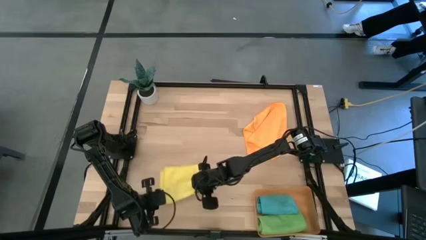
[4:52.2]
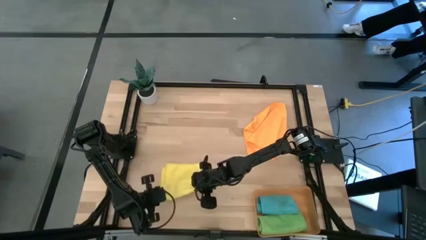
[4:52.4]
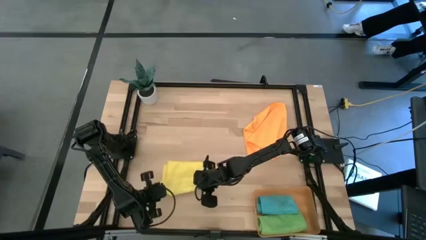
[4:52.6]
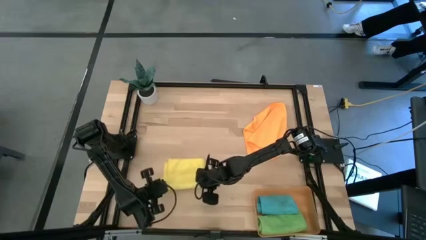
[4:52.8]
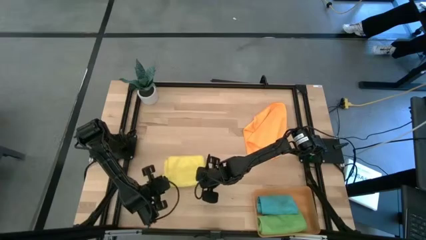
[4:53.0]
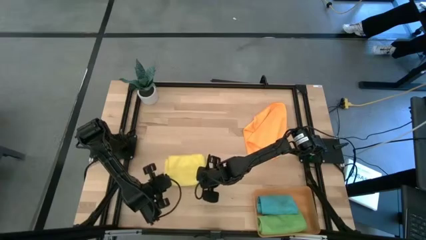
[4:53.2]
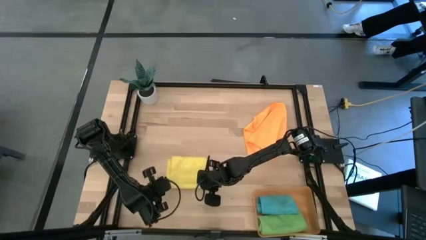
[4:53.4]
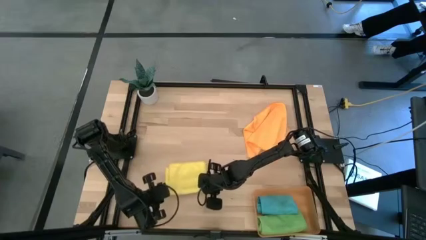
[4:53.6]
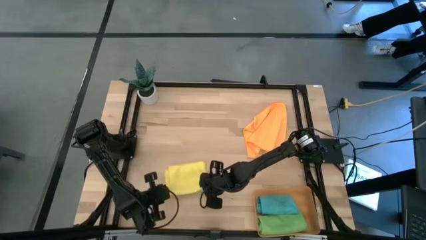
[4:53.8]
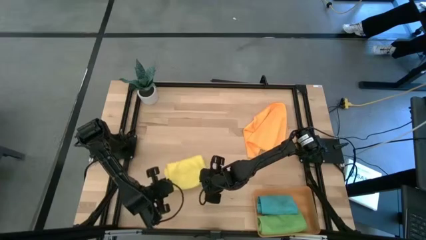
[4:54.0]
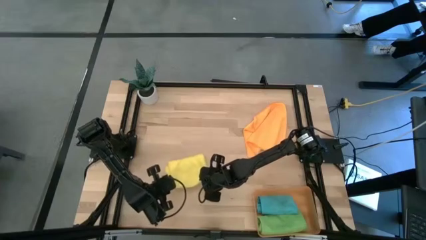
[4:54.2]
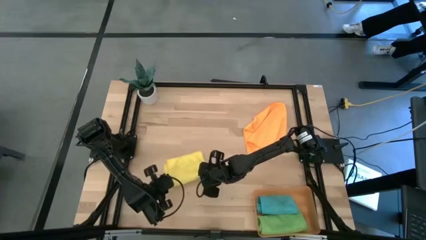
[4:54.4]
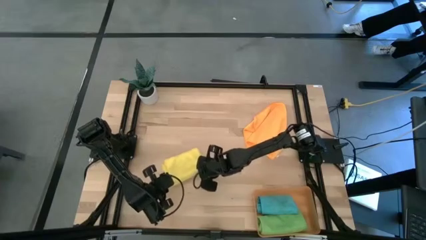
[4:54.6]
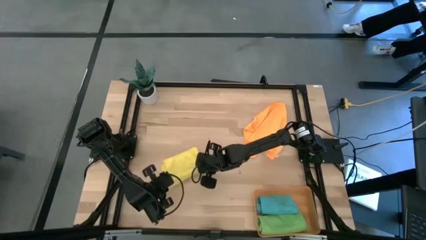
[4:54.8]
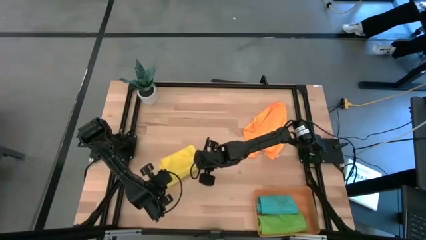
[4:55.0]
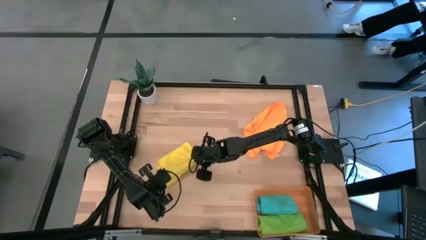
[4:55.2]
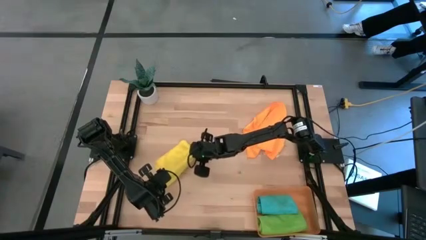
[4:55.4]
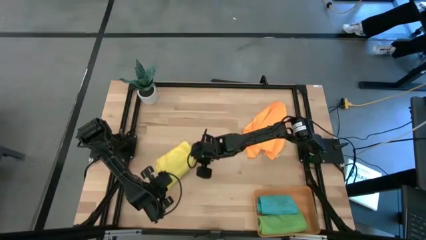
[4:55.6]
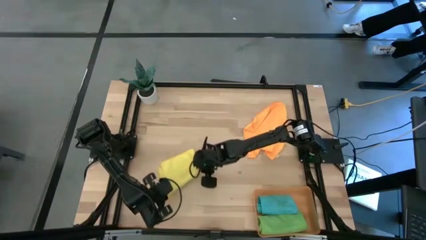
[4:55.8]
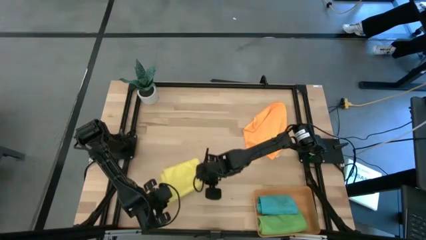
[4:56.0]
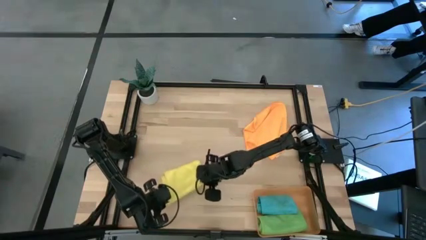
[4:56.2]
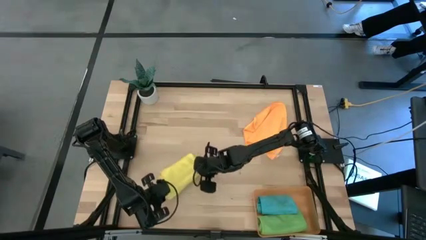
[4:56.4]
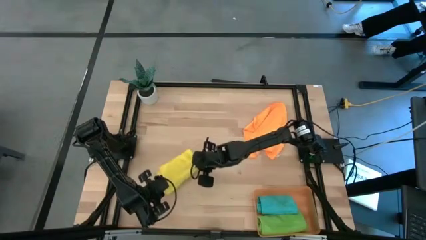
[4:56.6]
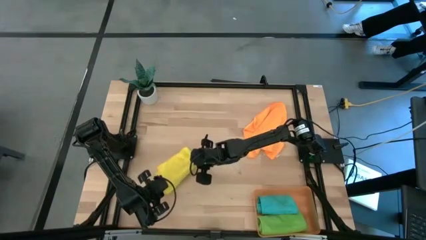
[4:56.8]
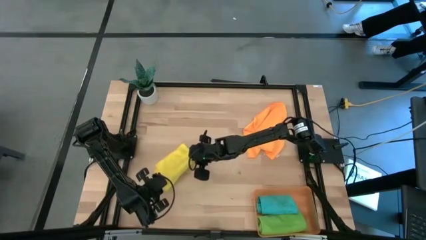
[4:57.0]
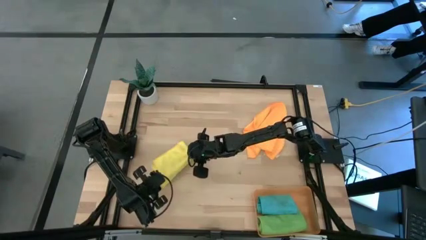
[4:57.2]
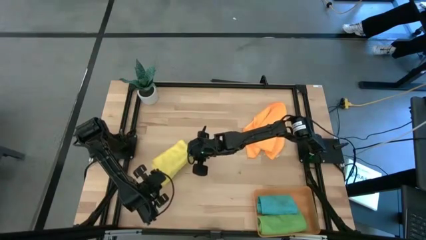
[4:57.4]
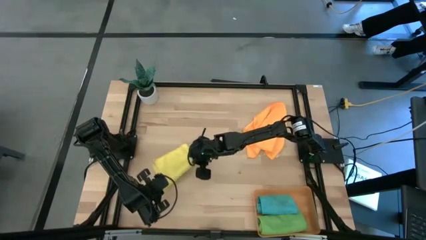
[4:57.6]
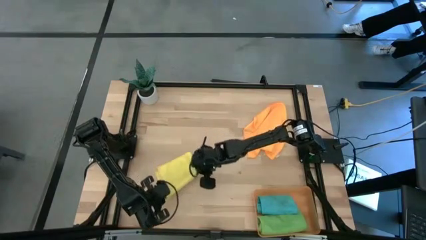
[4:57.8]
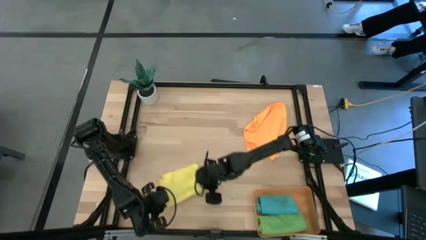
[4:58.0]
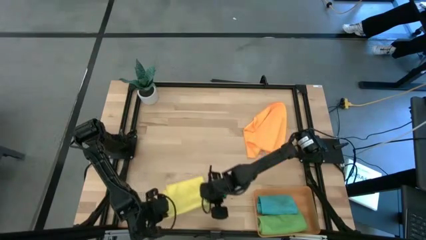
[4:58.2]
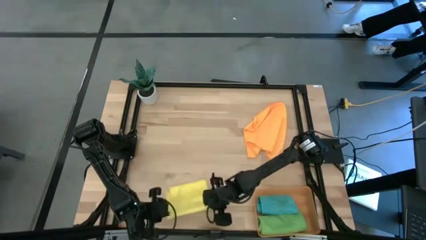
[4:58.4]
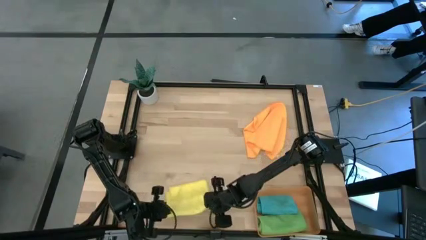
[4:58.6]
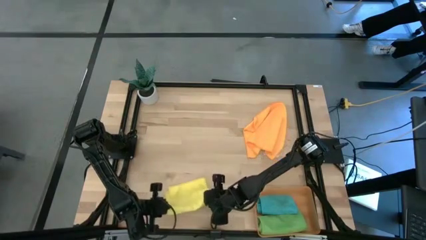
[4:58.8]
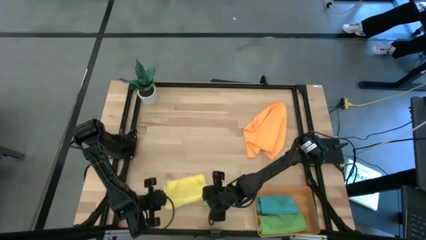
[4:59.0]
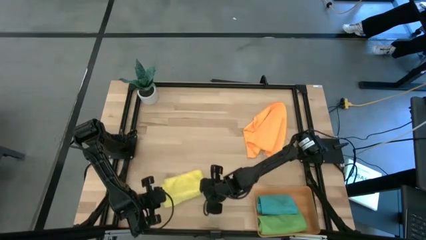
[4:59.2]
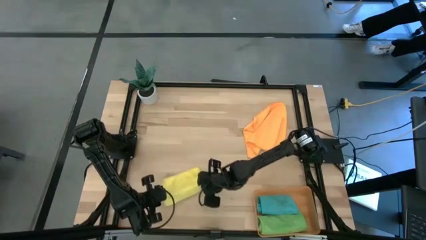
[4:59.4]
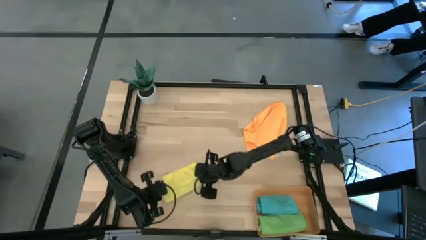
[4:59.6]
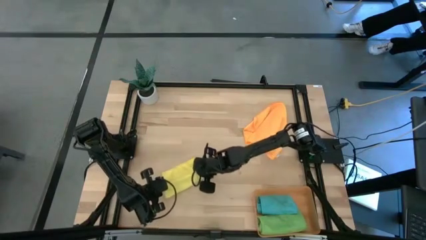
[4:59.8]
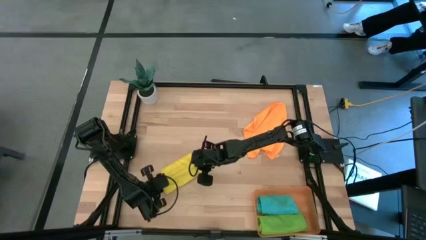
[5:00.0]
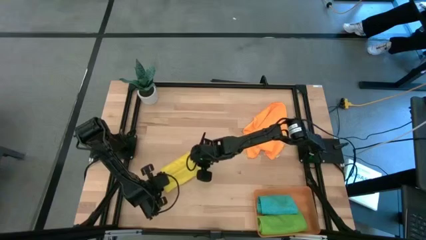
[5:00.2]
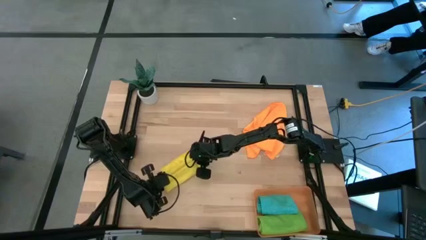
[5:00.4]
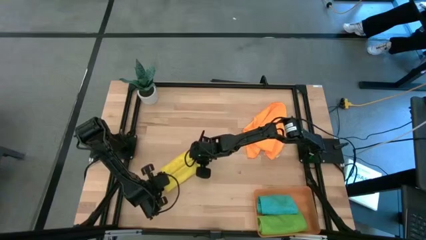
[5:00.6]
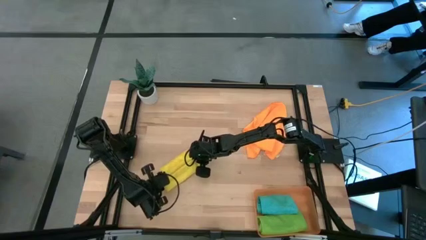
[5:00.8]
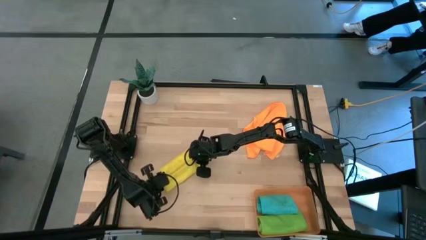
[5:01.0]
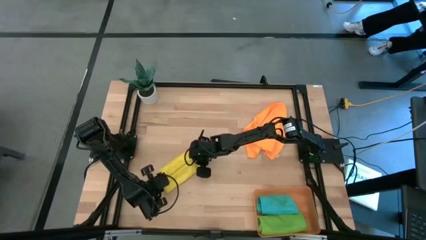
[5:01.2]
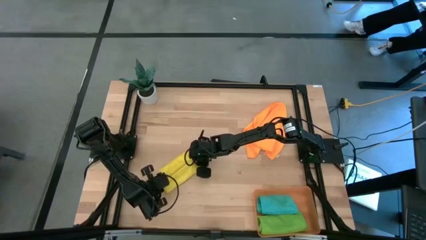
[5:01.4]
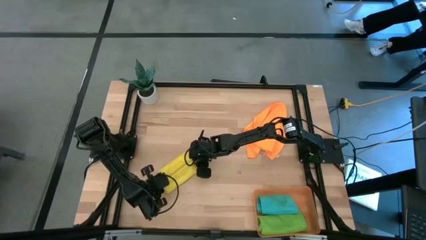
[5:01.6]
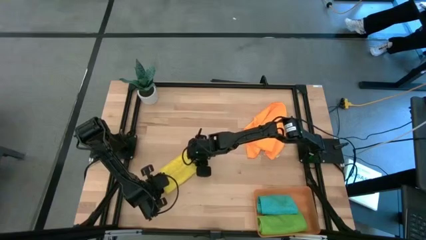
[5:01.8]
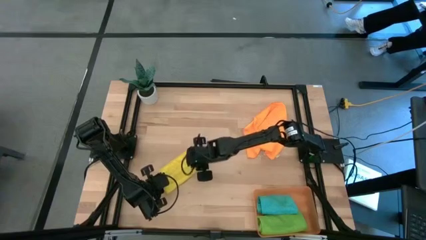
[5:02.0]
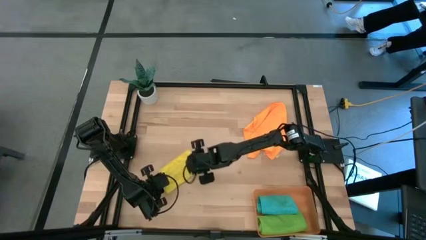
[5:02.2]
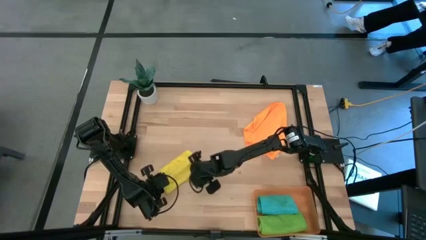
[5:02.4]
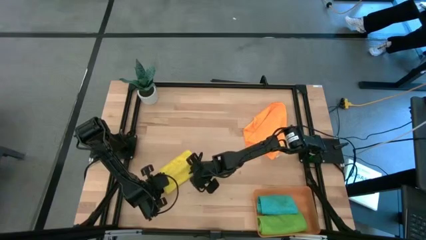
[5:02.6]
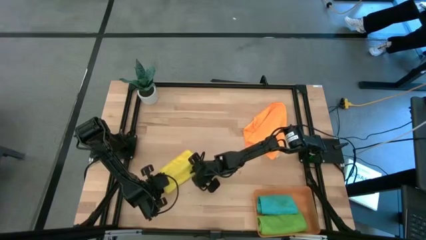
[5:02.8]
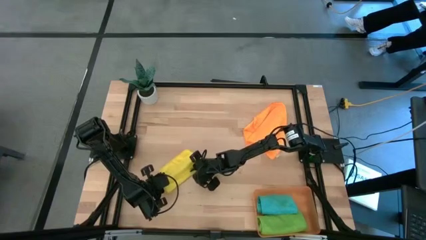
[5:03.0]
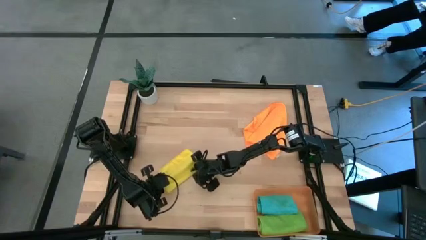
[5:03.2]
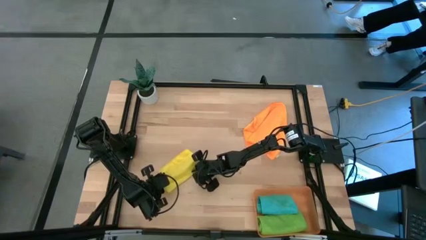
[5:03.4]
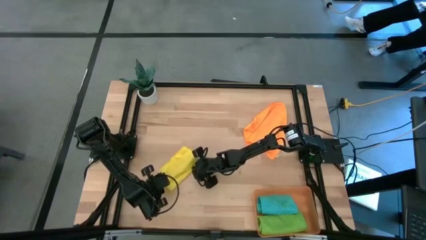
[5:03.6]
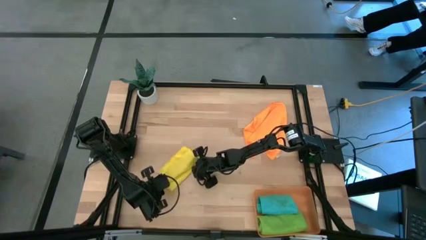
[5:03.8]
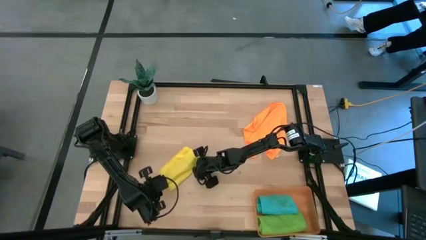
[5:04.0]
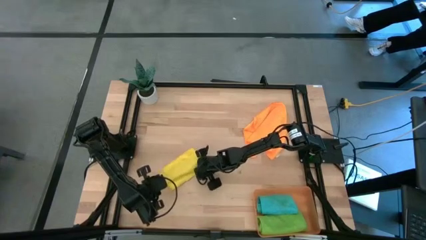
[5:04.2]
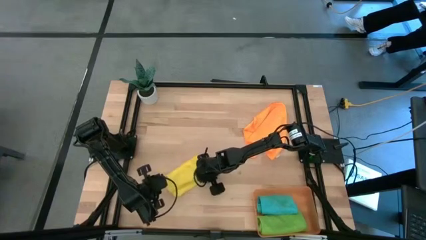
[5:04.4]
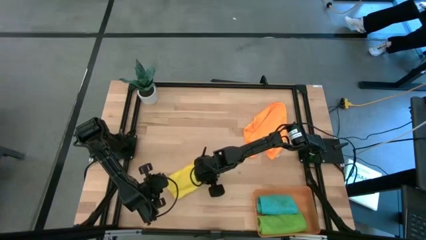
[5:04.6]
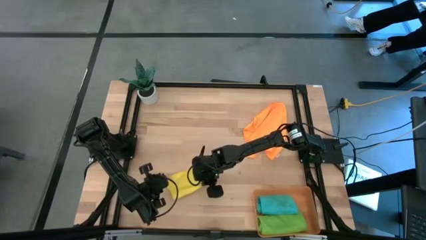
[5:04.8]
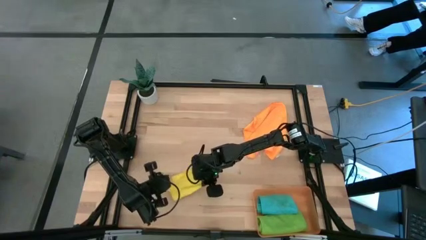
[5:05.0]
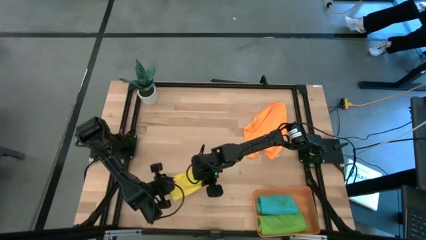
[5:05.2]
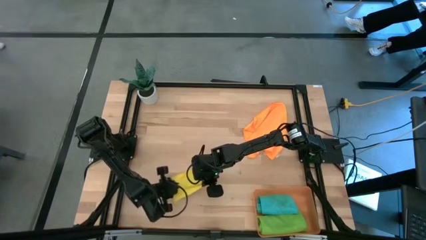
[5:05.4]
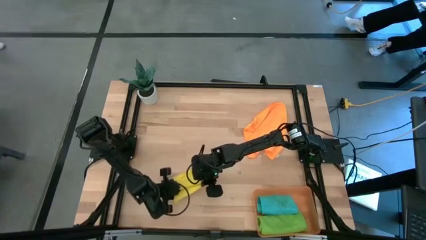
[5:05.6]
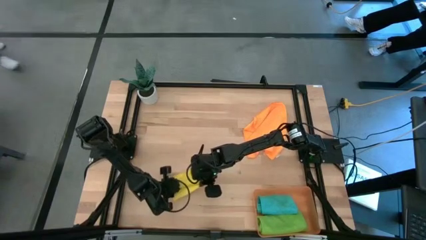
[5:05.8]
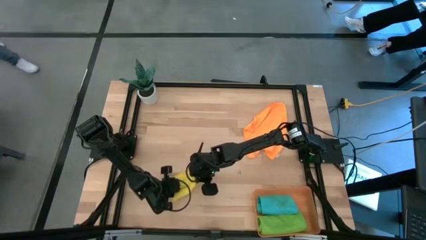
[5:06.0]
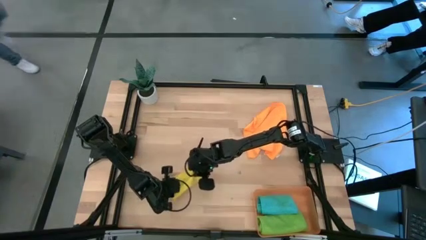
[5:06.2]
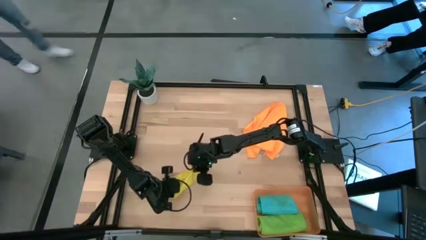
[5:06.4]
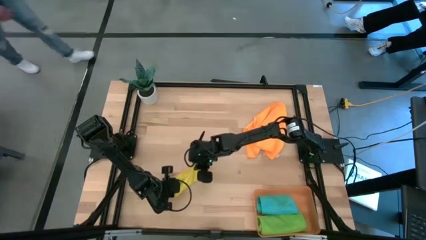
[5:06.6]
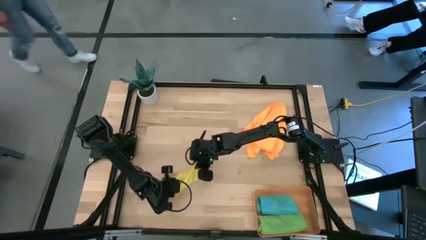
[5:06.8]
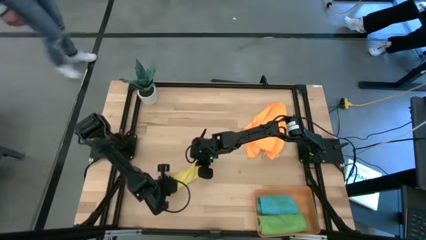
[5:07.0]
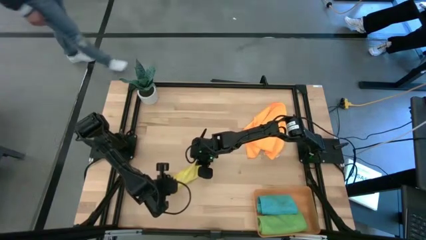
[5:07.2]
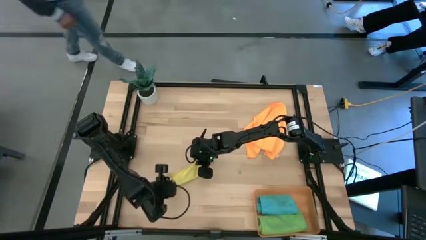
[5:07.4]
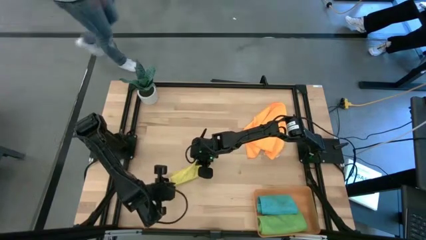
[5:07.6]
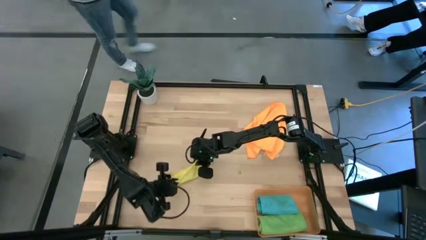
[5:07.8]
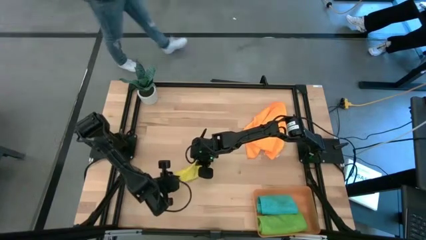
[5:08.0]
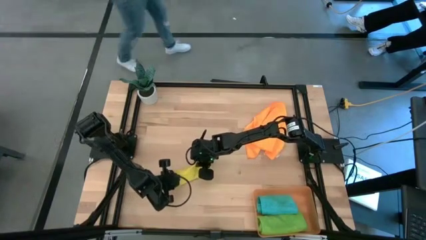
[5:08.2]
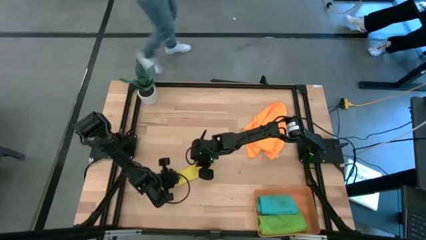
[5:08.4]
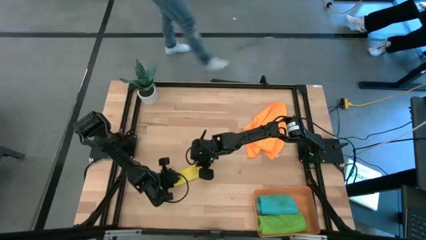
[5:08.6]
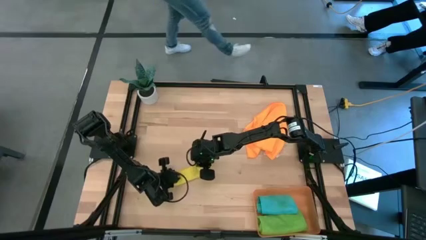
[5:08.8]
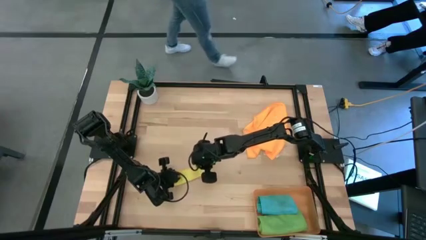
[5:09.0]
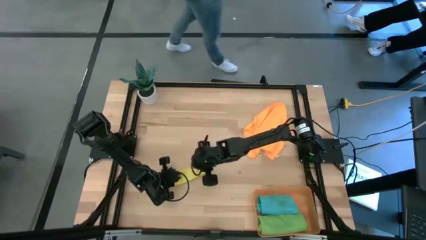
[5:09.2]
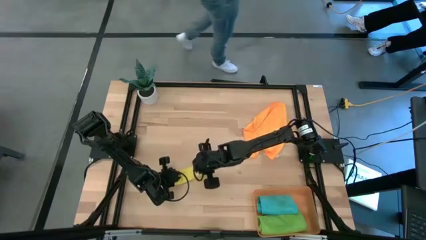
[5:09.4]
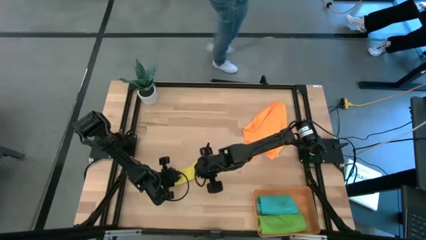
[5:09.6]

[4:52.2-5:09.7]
Task: Roll microfiber towels into tight, uniform cylinder then place into a basket
Roll the yellow microfiber towel
